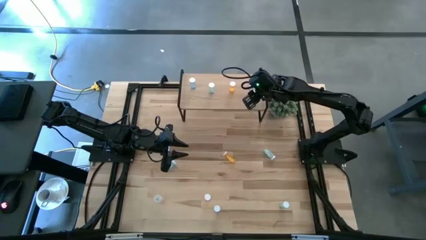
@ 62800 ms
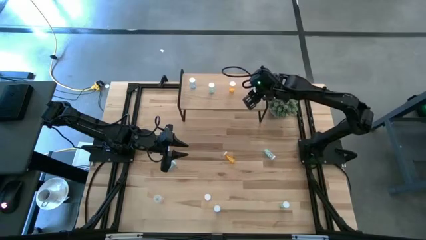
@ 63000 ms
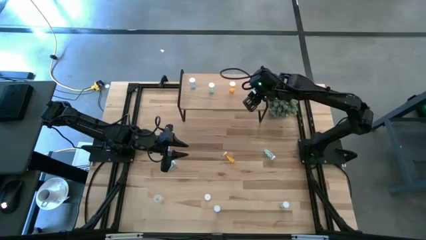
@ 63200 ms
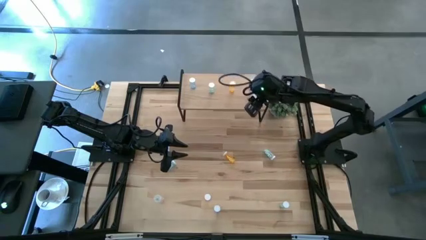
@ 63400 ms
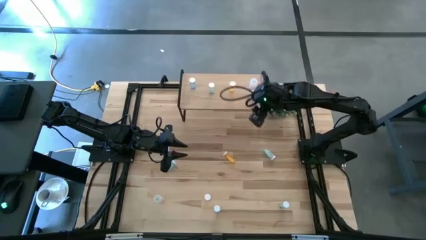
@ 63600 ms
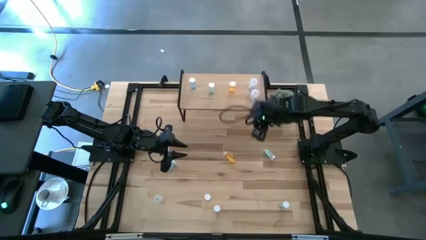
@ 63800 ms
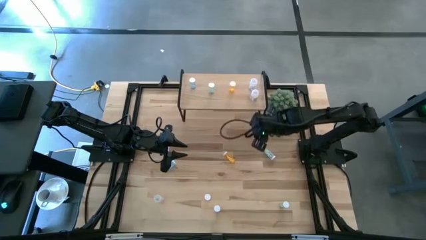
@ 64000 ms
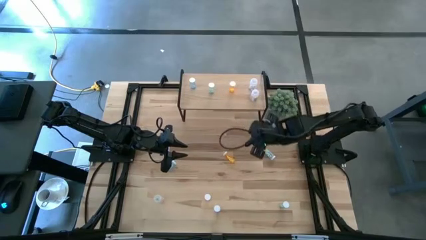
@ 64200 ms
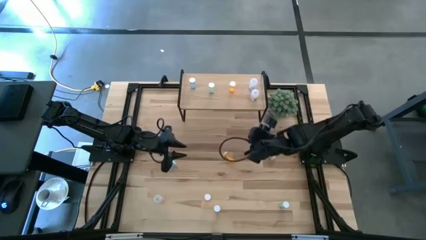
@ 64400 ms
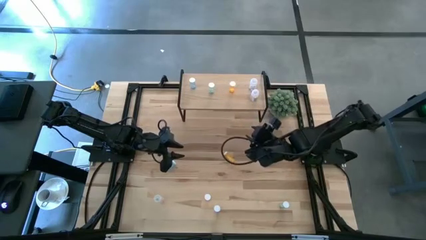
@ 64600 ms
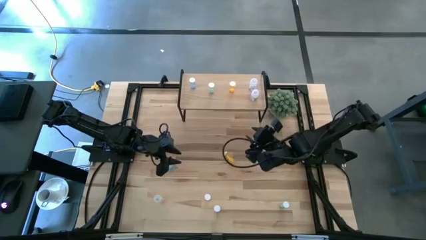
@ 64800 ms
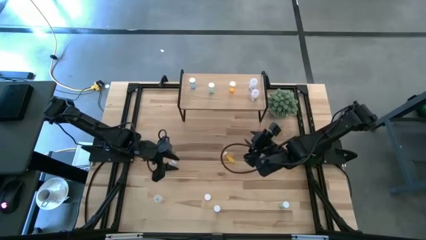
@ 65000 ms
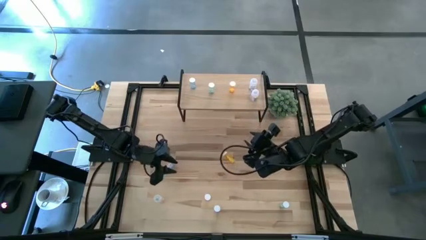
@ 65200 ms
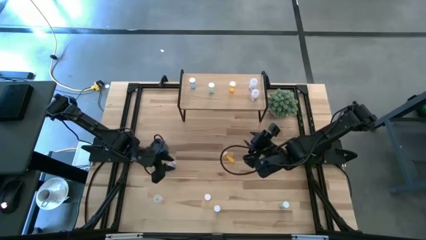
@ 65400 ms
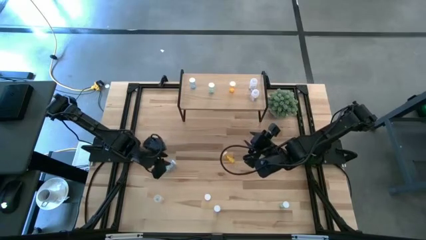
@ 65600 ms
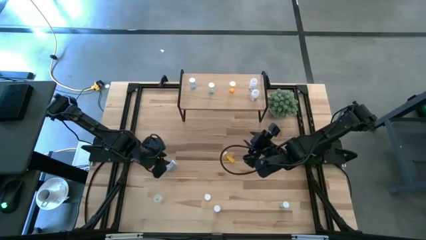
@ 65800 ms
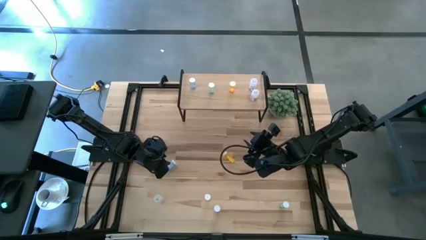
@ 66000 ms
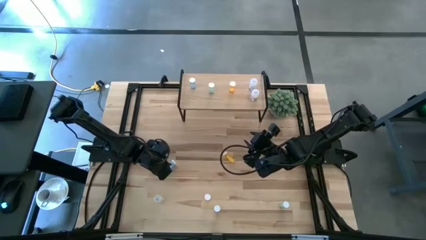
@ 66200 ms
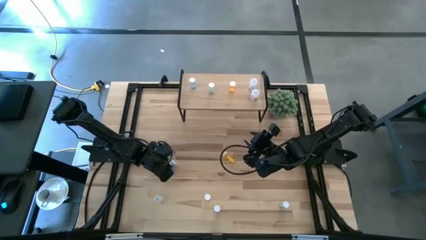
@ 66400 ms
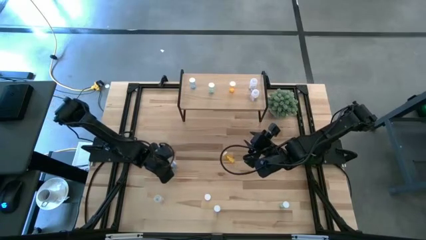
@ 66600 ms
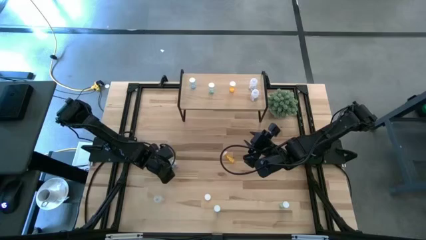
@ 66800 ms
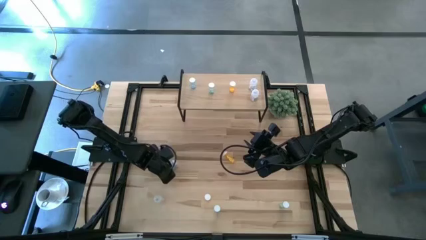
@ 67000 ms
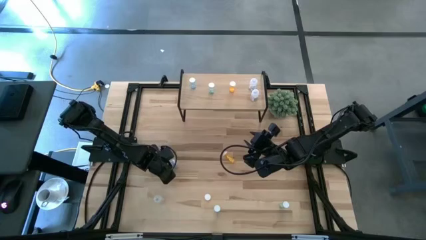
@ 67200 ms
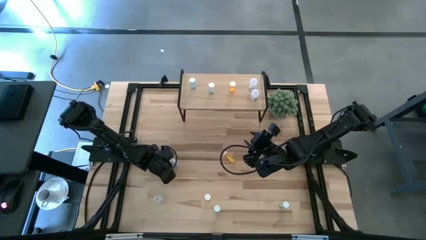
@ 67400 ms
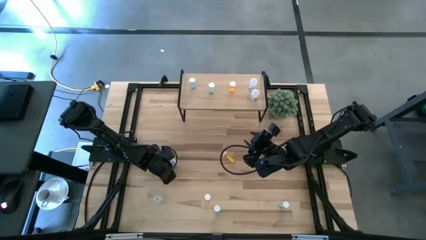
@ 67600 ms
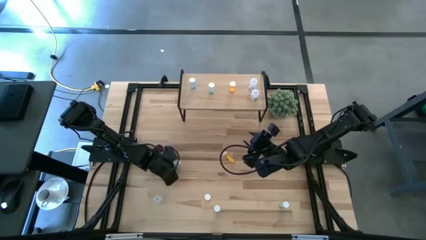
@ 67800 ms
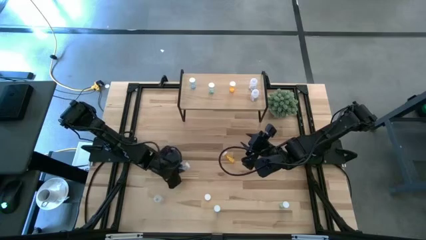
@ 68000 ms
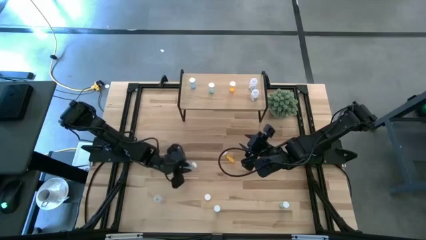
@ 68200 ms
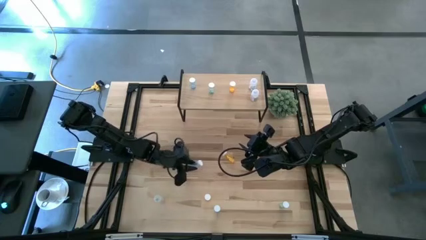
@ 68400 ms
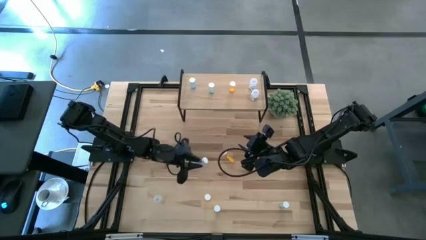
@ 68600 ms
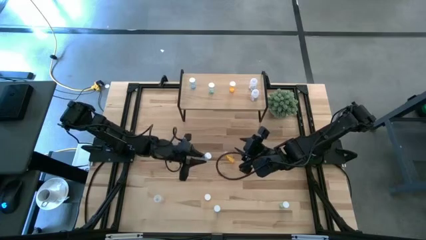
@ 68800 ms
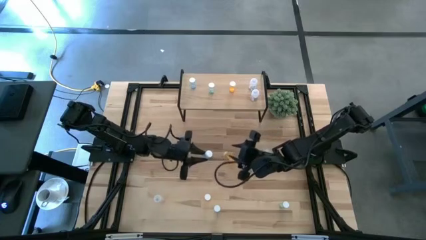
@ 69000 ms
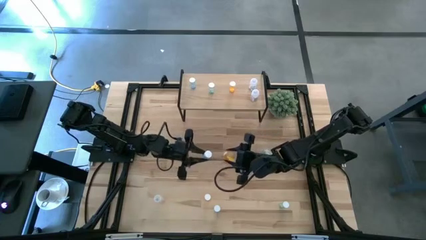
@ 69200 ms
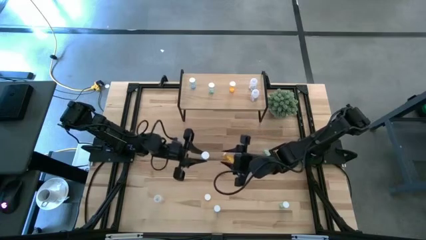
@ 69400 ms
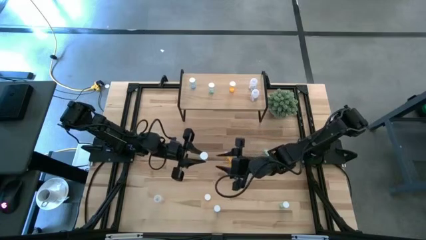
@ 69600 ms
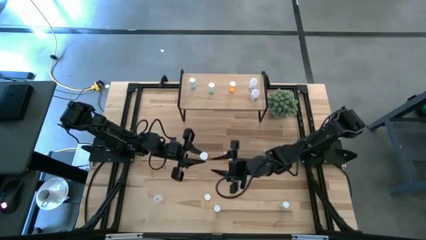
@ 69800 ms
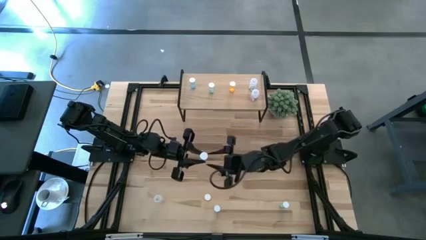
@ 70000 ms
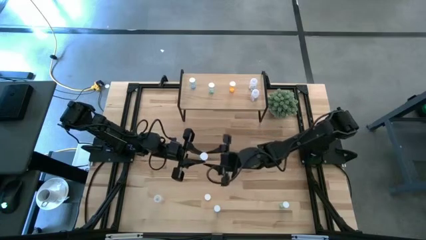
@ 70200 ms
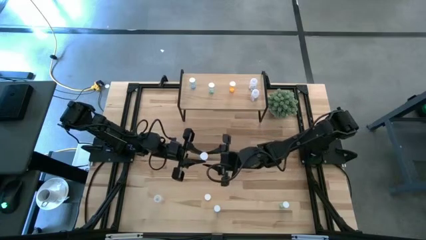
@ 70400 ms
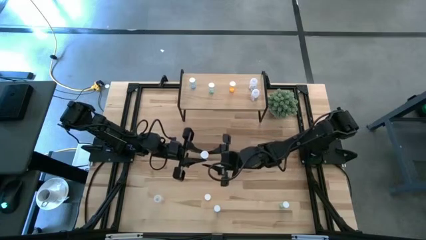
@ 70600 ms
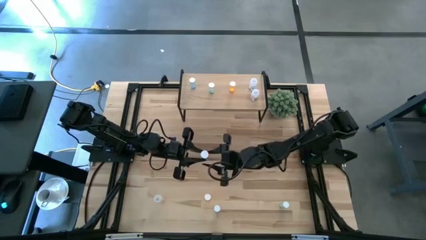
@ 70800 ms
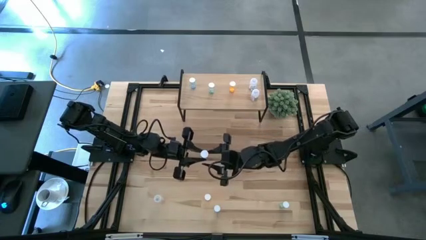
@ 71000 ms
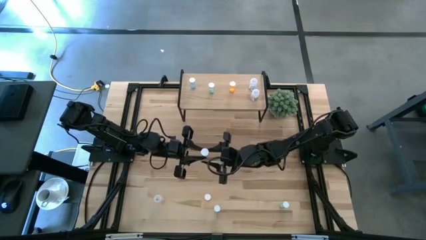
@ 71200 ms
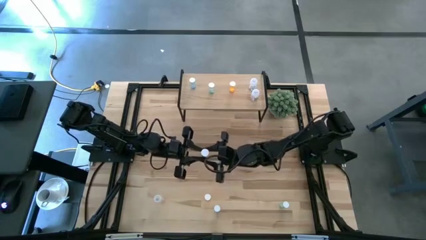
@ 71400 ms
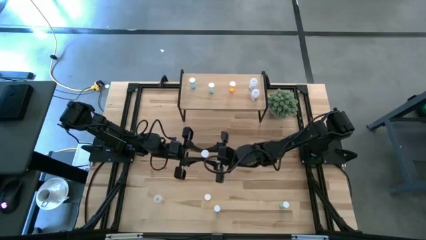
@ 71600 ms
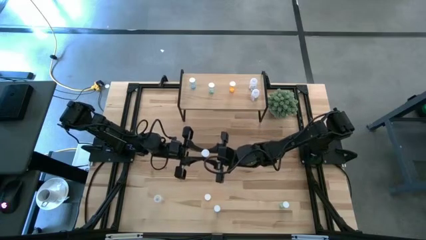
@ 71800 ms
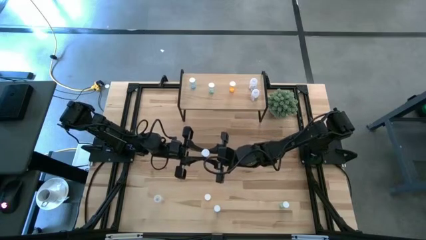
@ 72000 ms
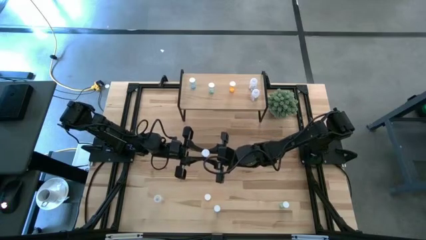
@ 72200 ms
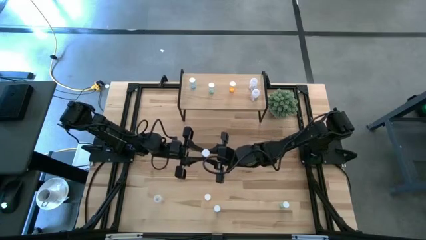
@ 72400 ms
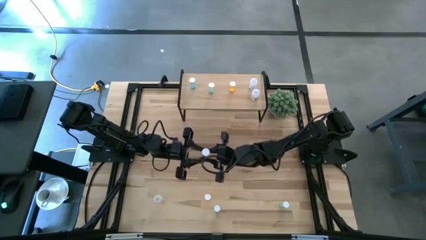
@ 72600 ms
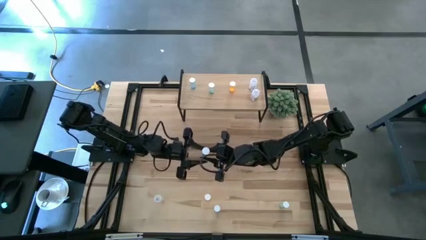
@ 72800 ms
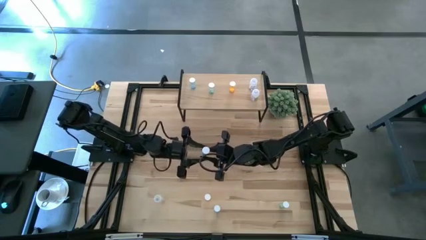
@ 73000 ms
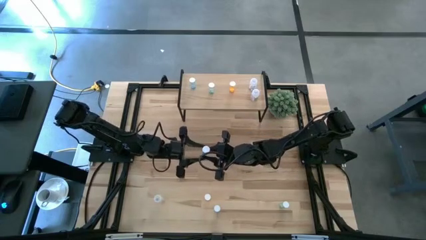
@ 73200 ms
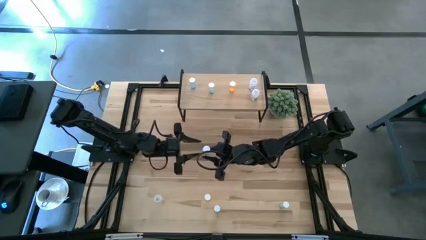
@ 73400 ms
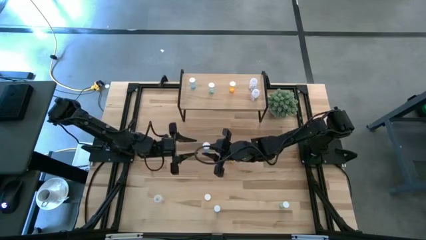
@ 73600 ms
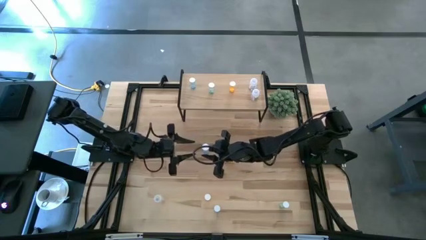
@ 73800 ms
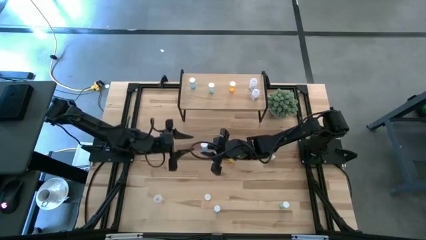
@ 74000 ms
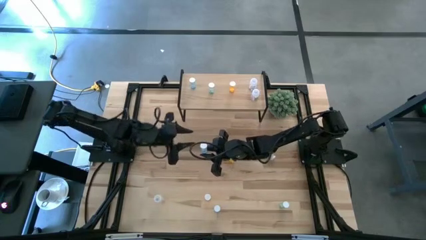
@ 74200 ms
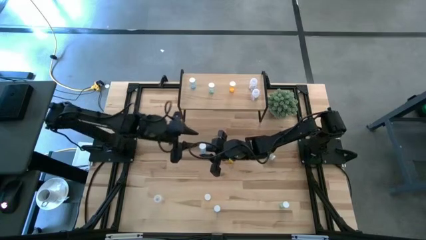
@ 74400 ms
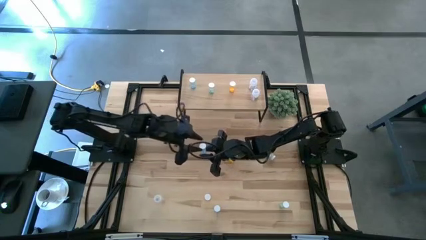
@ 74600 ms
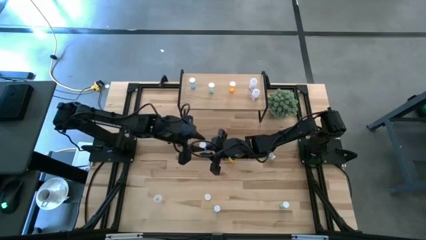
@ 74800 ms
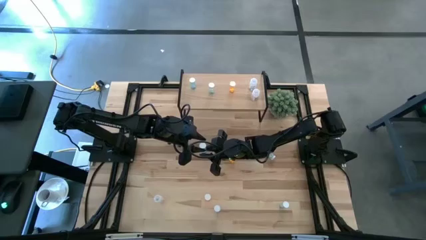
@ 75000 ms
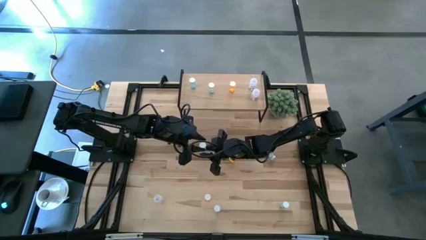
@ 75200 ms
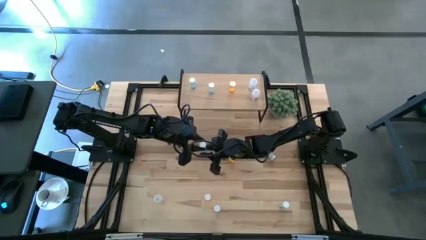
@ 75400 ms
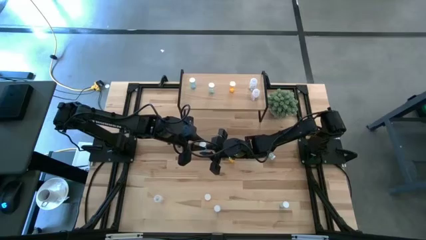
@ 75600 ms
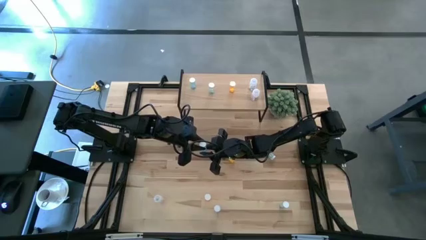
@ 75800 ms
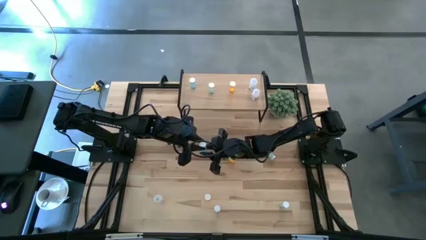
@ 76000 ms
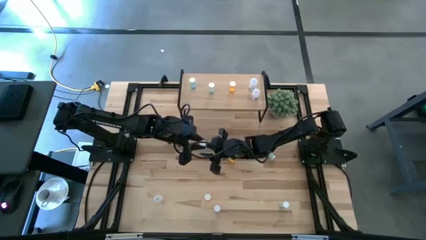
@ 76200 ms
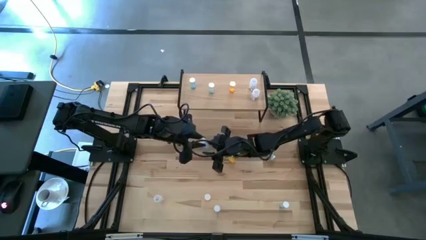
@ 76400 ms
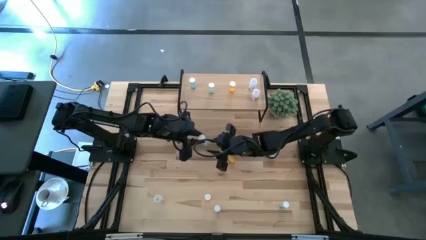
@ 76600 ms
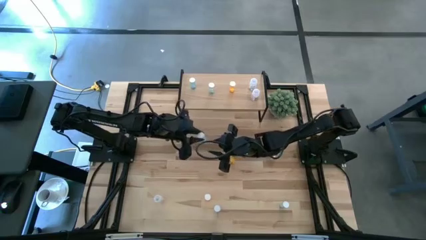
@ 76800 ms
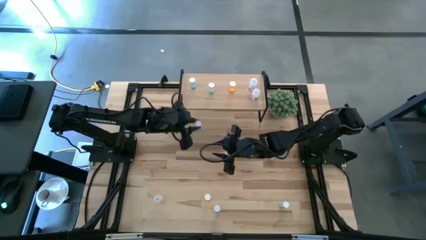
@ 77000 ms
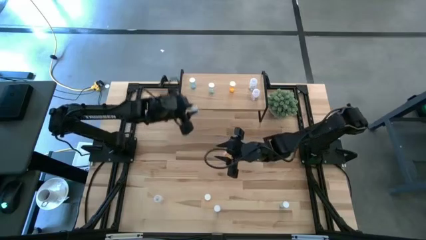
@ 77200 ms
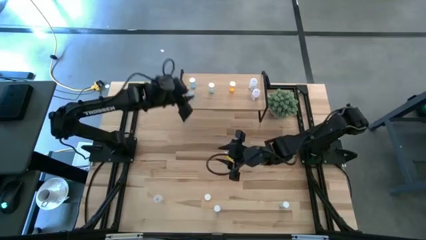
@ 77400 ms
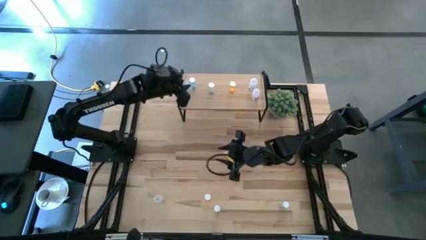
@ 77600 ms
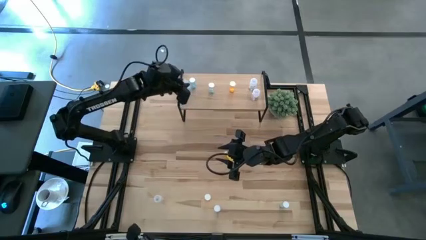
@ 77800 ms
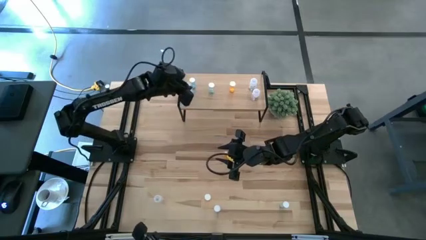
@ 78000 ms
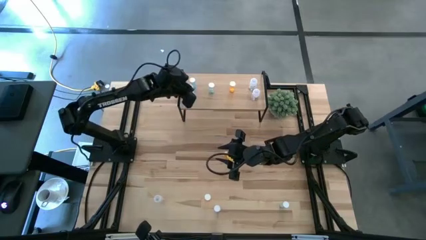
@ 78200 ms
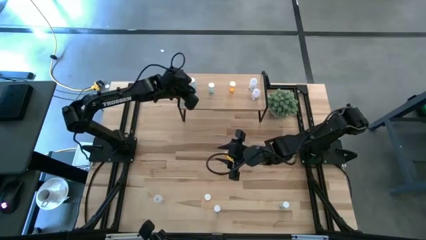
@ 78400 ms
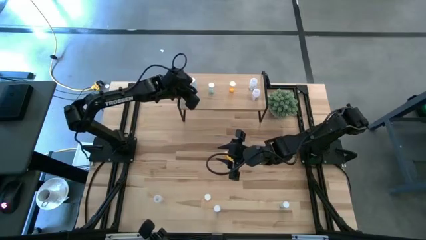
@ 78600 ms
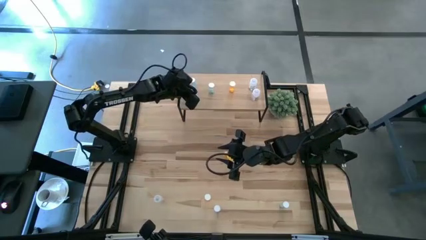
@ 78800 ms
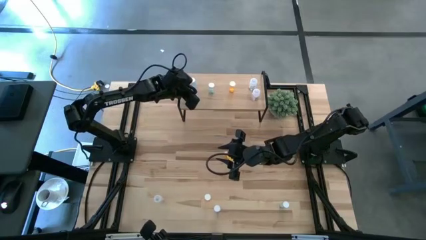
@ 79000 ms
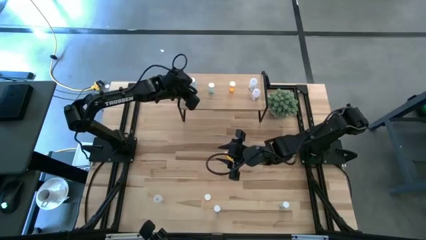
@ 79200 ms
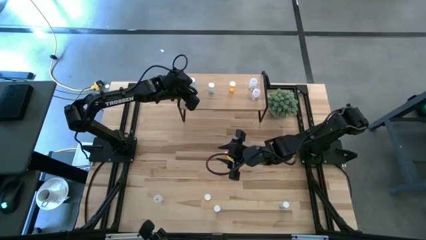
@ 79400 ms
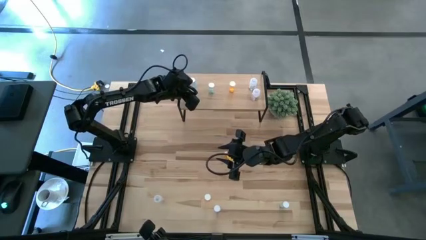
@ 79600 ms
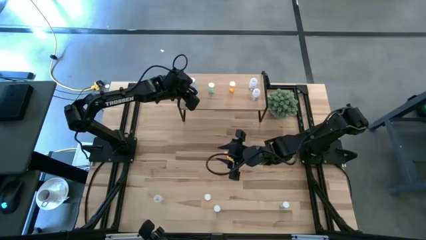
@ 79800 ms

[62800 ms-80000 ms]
Task: Pick and place medicine bottles onto shelf by color
Put the top blue pill bottle on the shelf aligned with the other blue pill bottle
